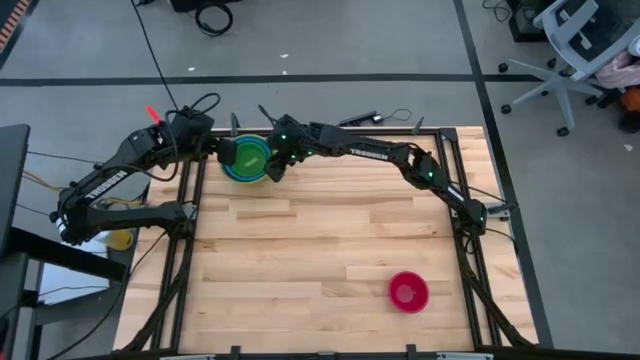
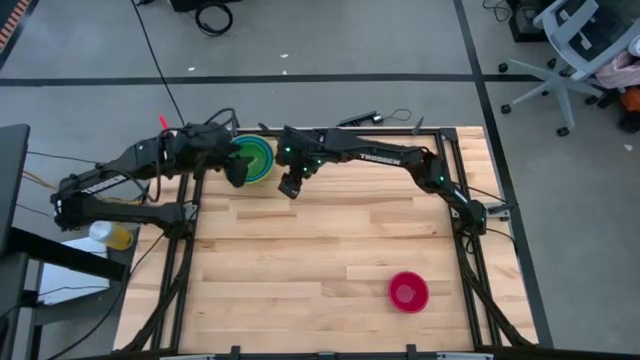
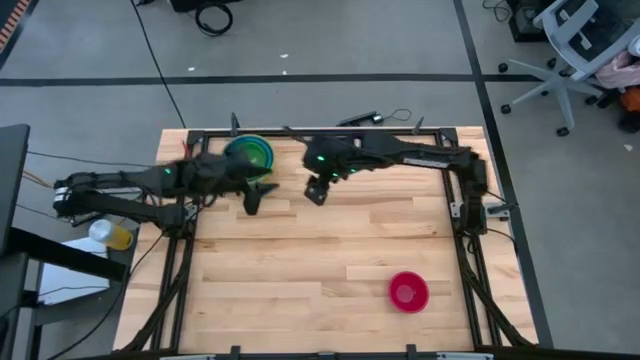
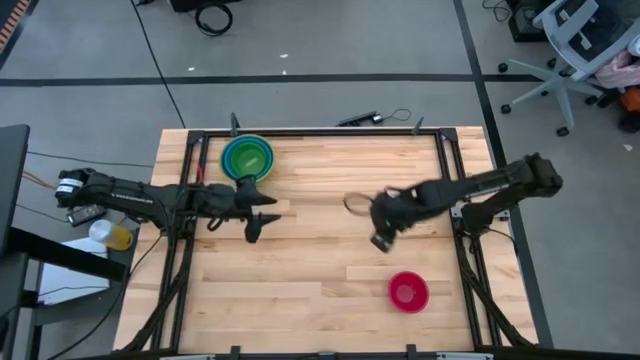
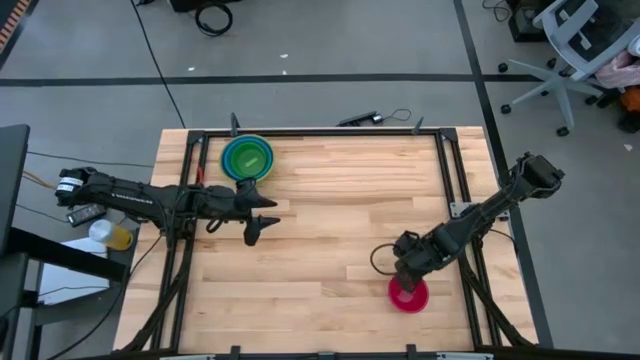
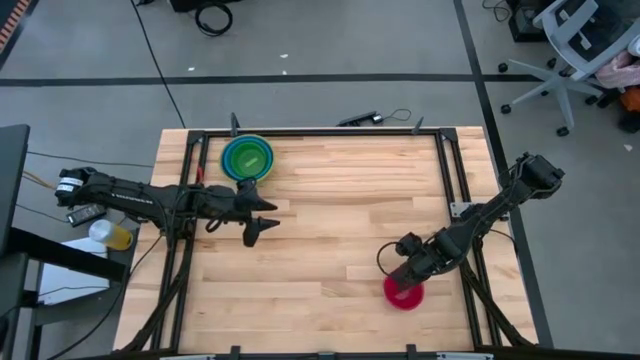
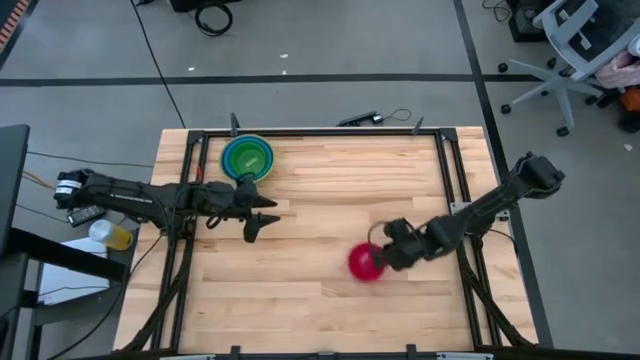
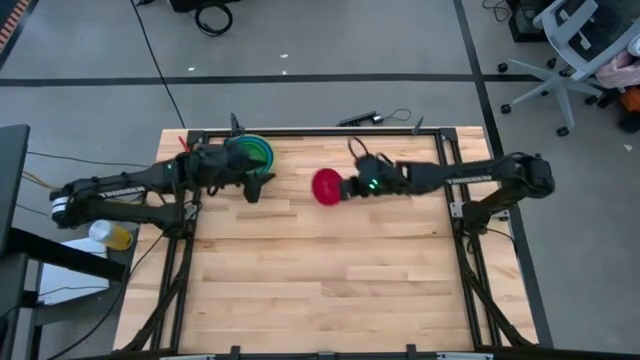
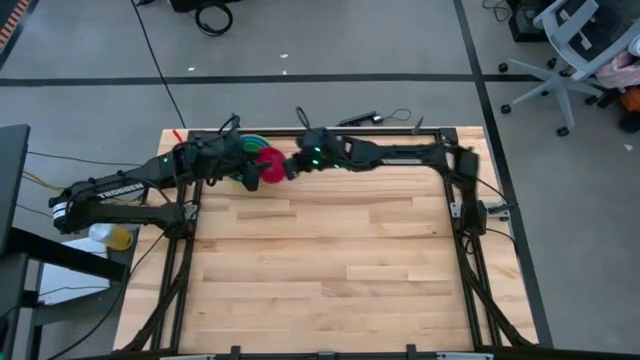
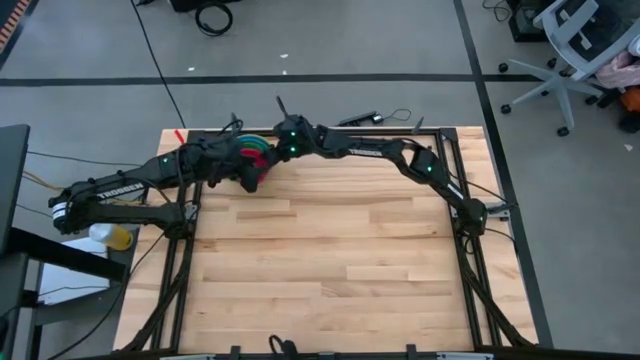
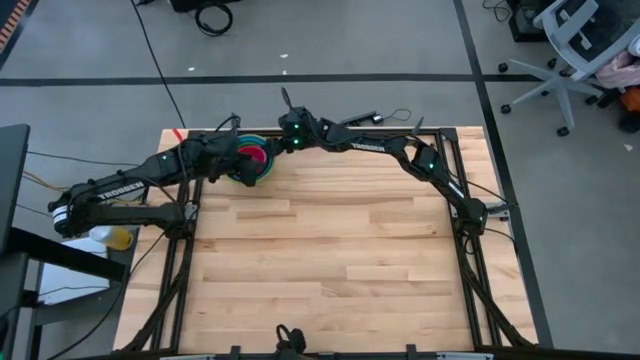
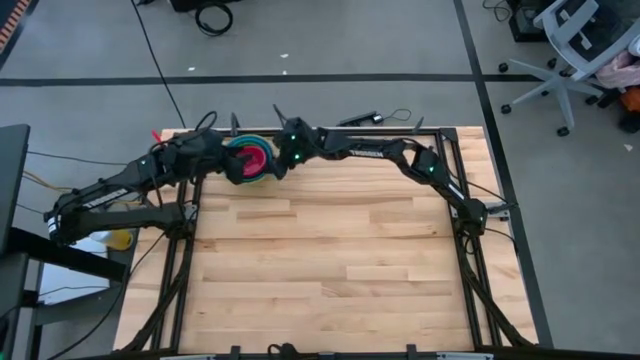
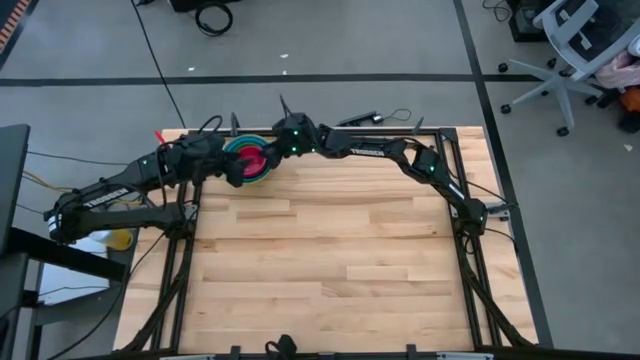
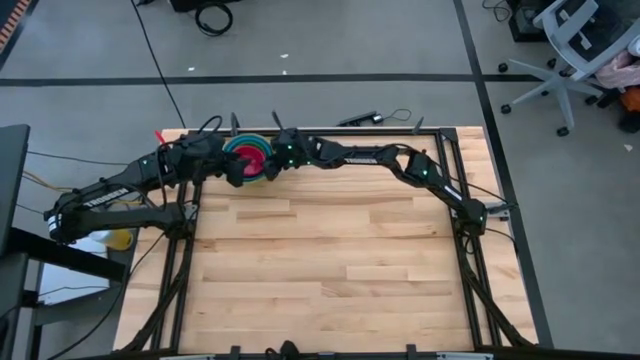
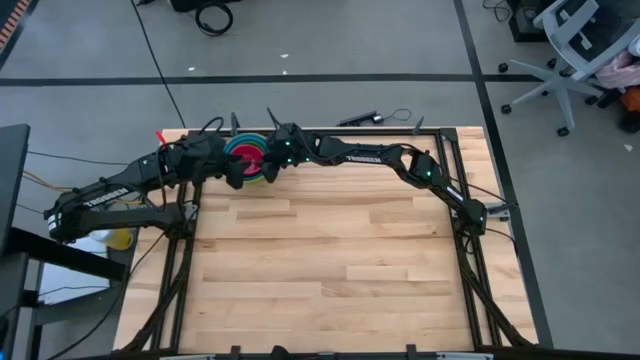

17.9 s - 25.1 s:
Stack the pink bowl on the light green bowl

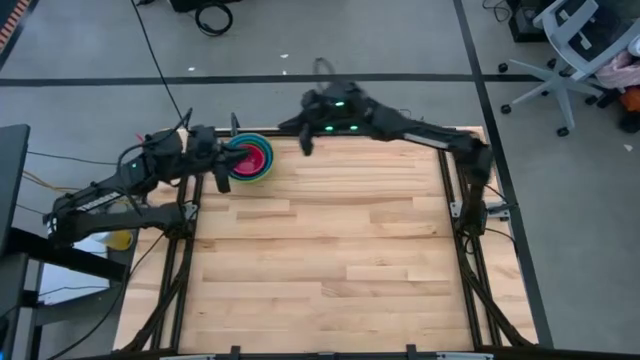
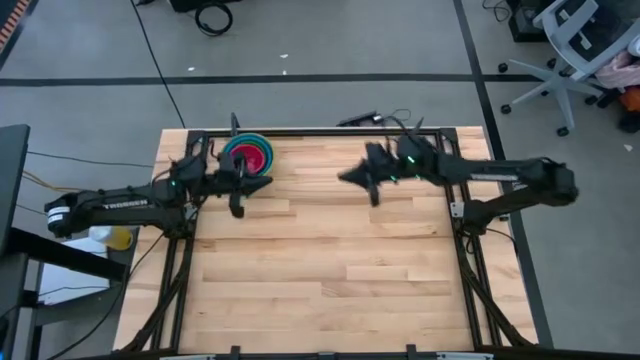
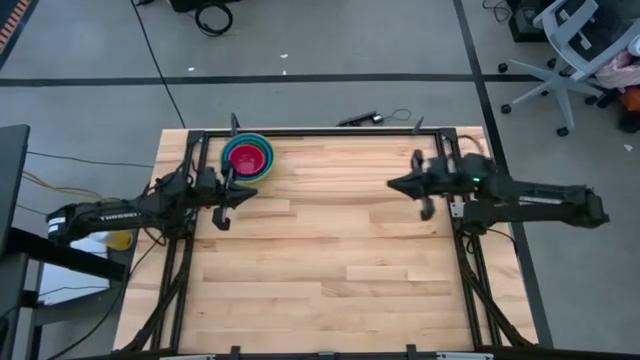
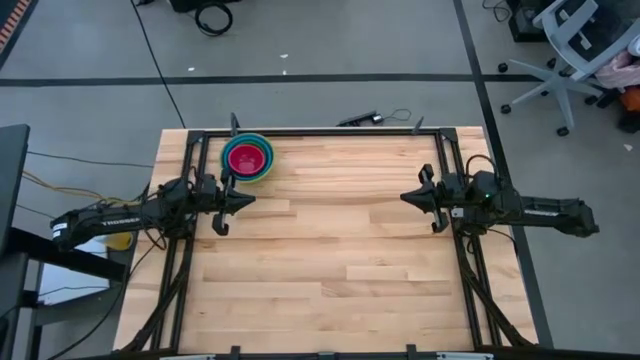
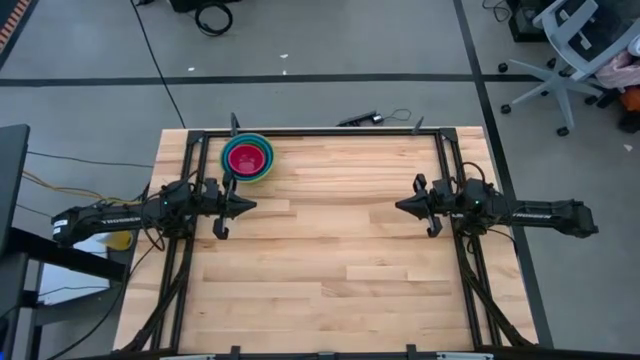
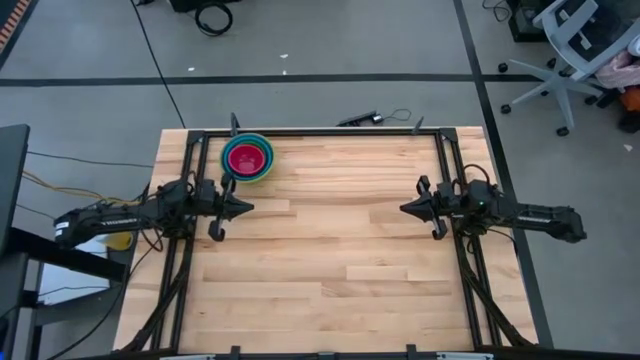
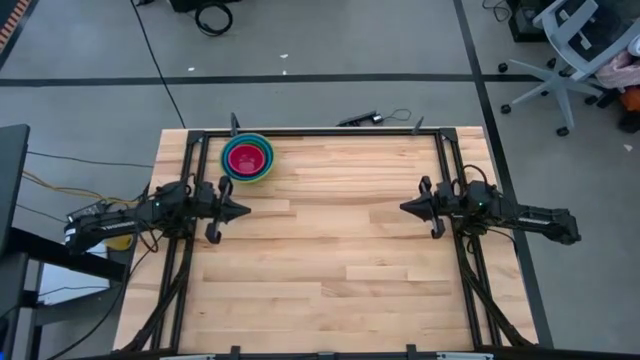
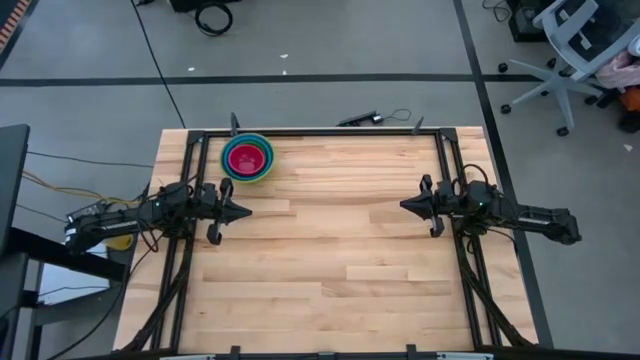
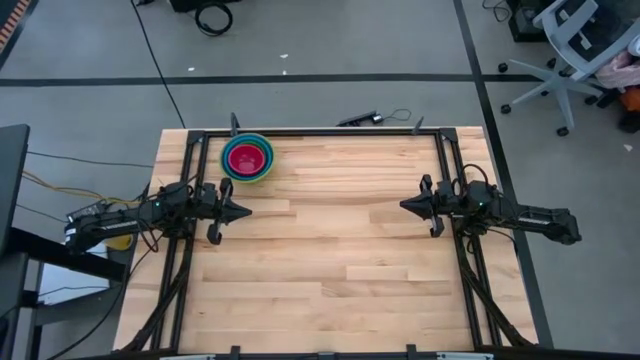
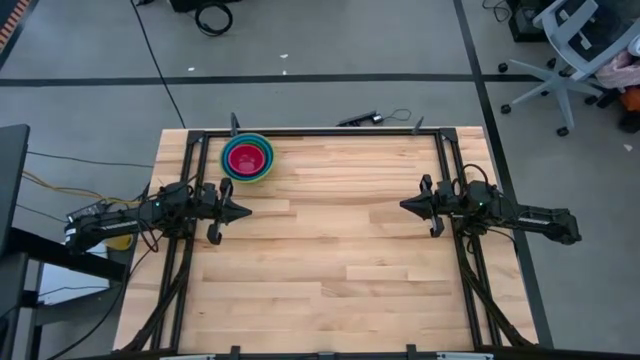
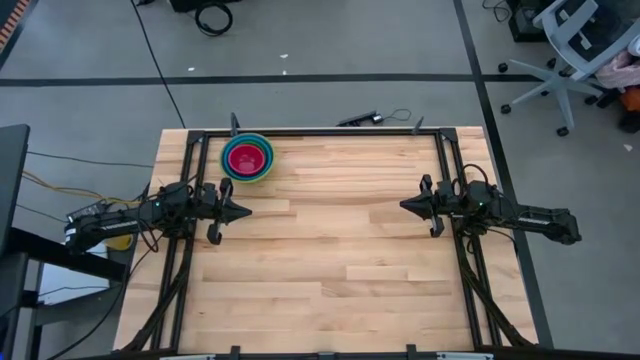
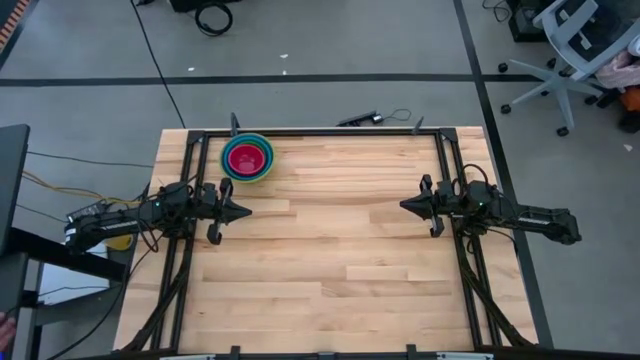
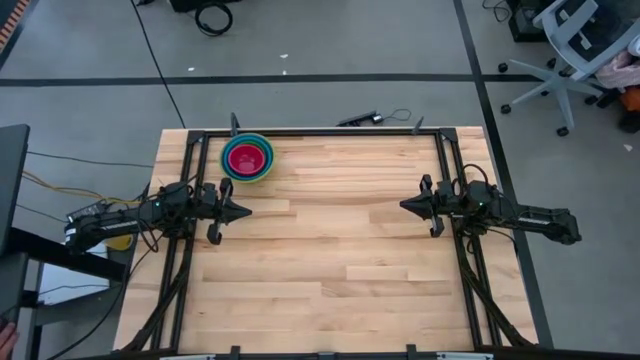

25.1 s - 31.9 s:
Return to Home Position

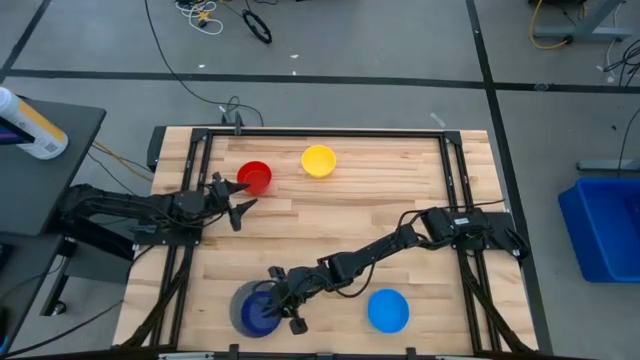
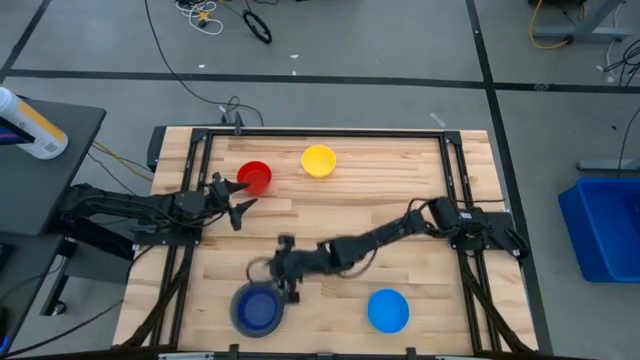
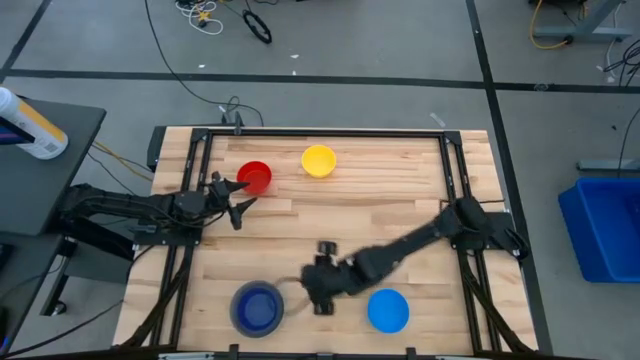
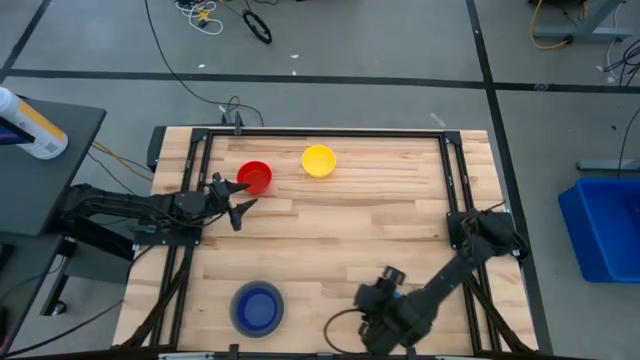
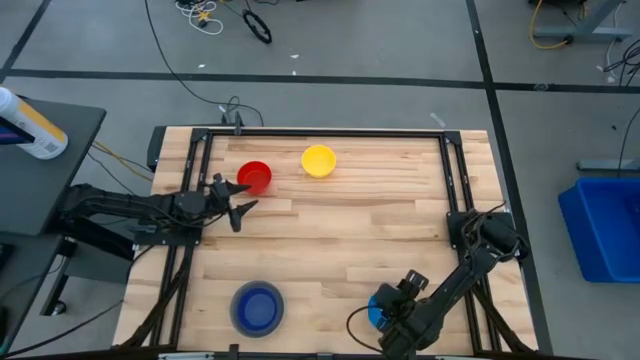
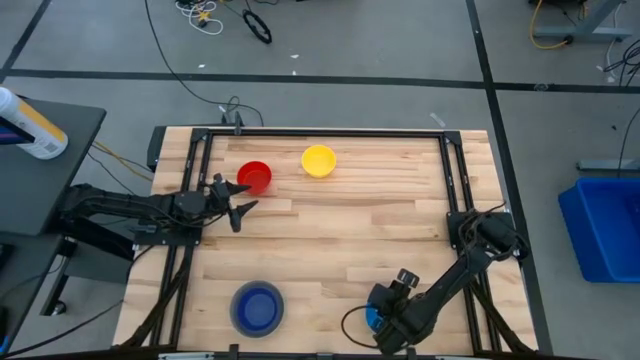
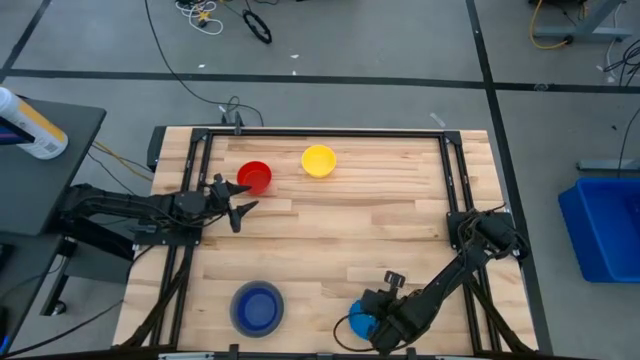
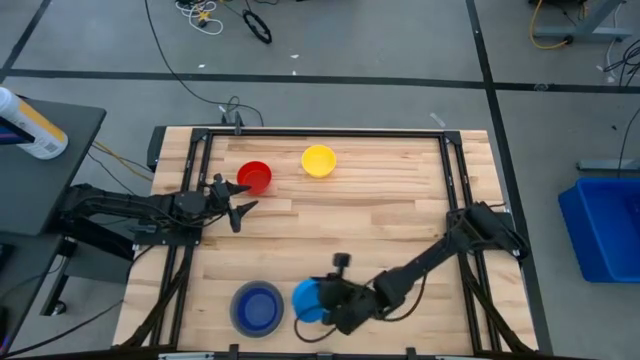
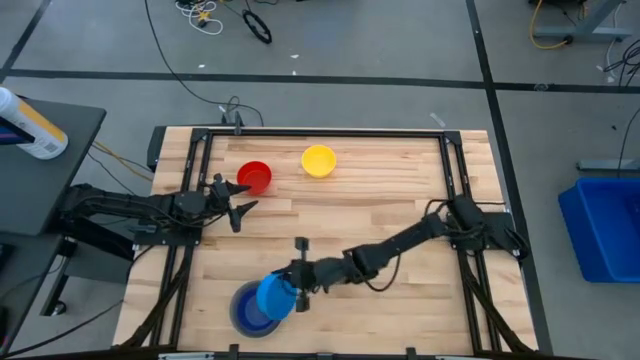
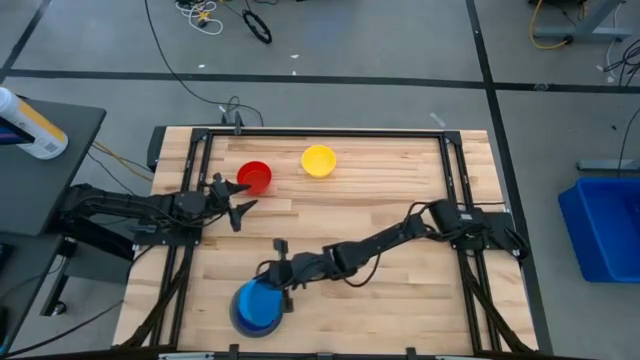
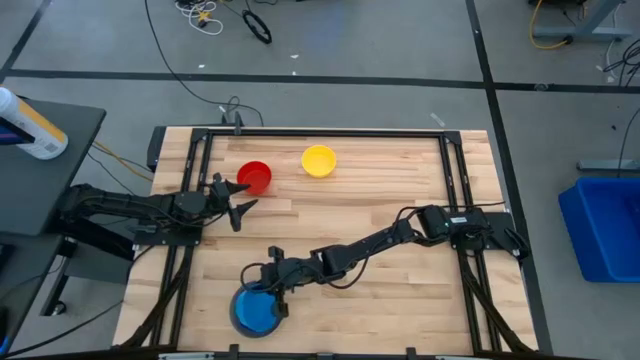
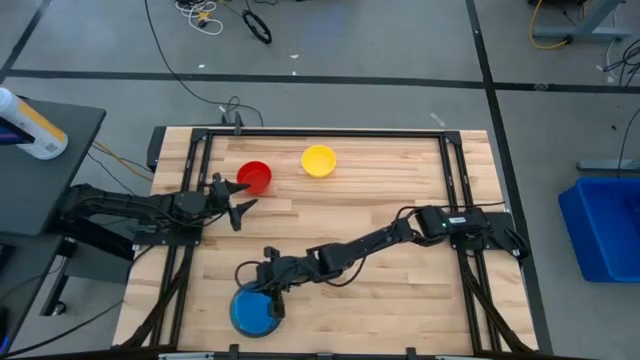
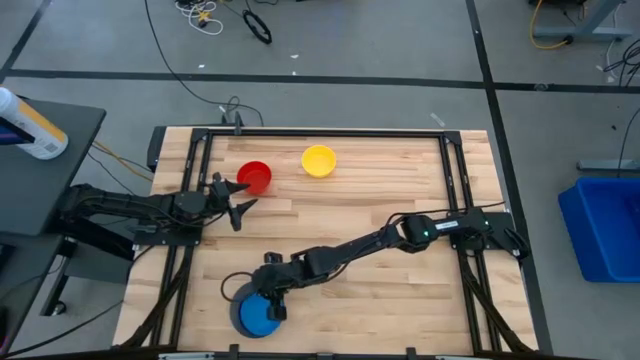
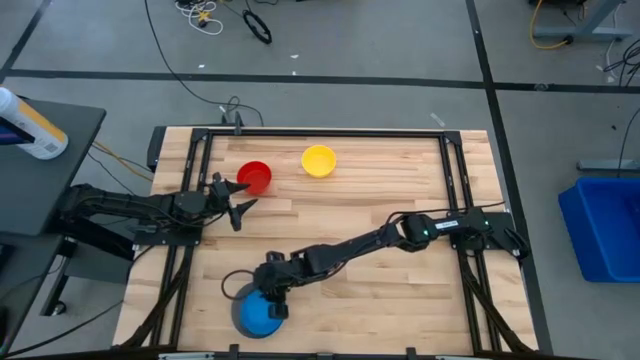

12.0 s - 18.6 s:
Stack the blue bowl on top of the dark blue bowl
